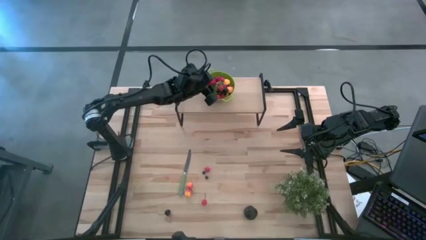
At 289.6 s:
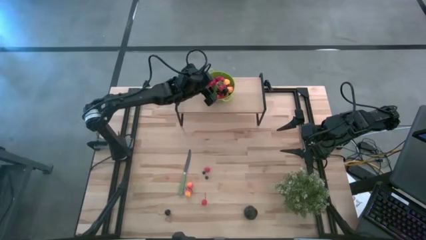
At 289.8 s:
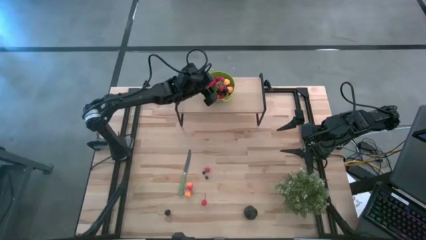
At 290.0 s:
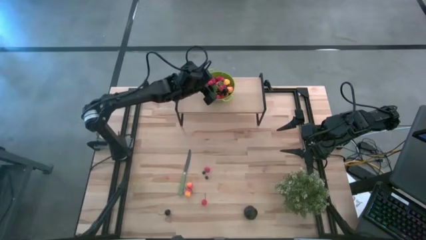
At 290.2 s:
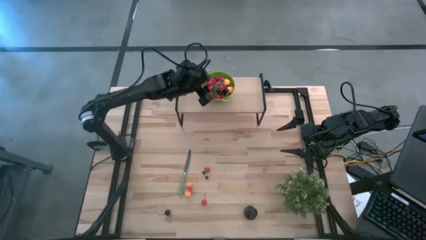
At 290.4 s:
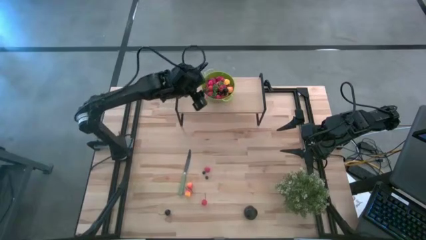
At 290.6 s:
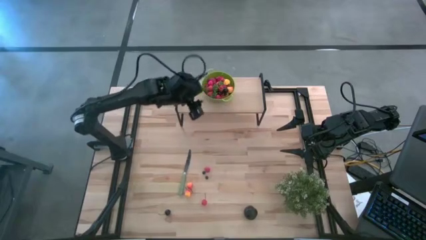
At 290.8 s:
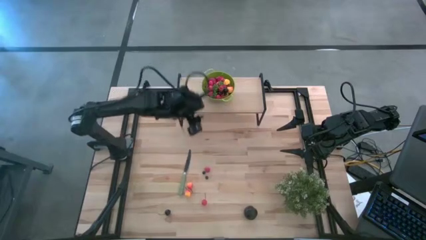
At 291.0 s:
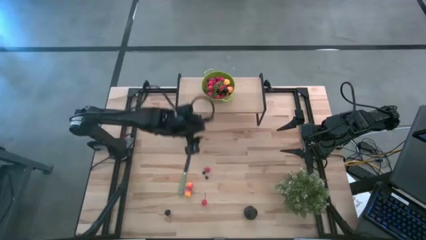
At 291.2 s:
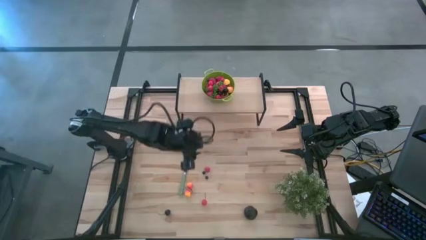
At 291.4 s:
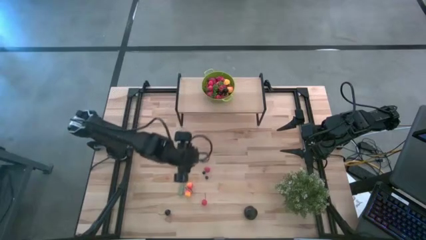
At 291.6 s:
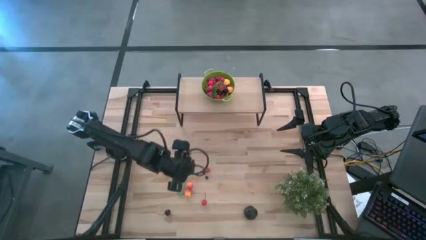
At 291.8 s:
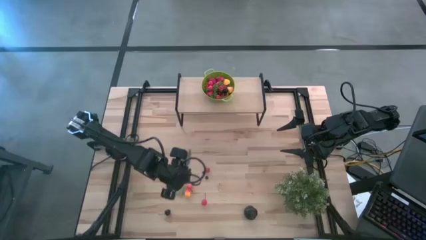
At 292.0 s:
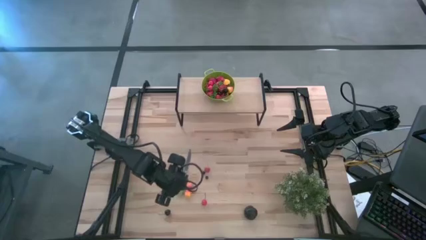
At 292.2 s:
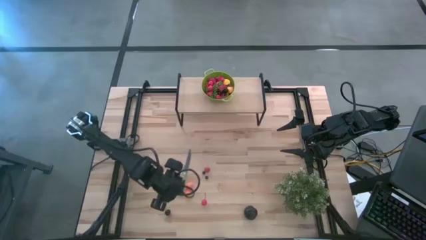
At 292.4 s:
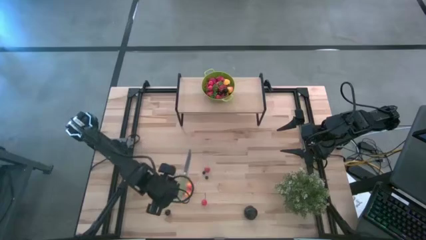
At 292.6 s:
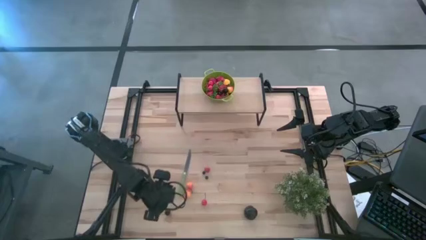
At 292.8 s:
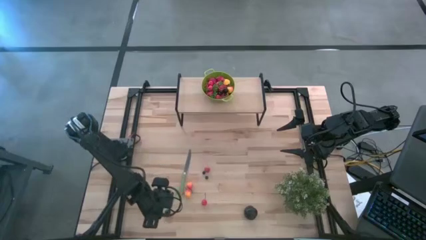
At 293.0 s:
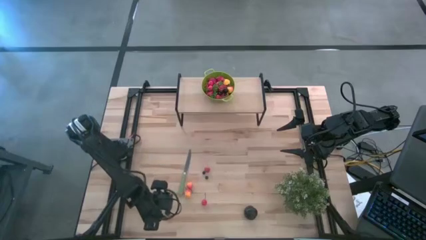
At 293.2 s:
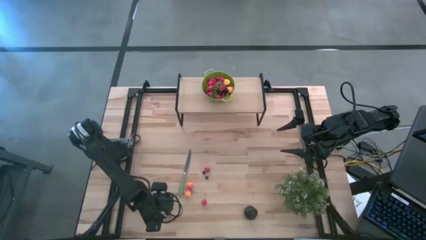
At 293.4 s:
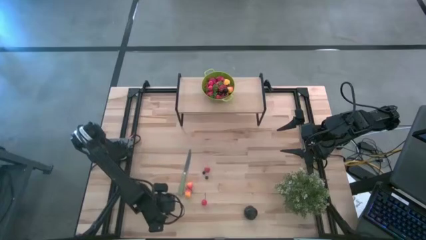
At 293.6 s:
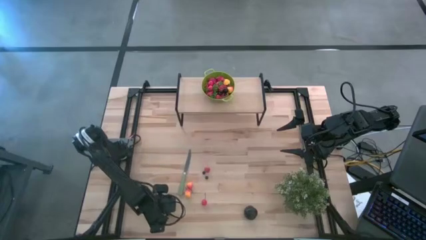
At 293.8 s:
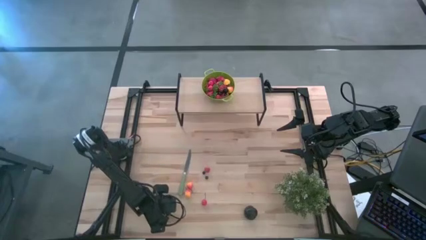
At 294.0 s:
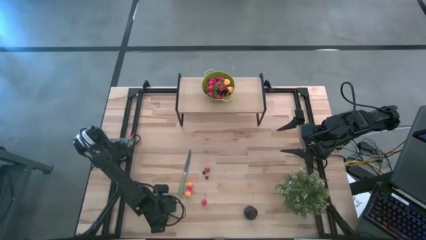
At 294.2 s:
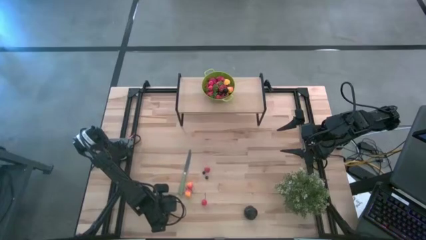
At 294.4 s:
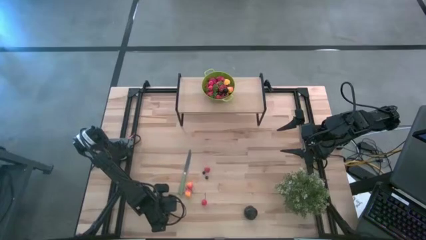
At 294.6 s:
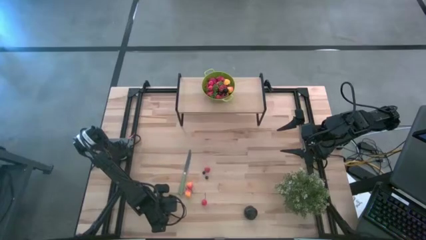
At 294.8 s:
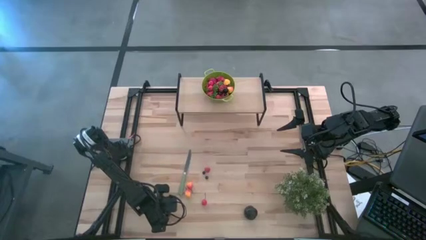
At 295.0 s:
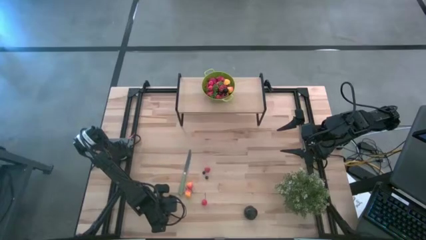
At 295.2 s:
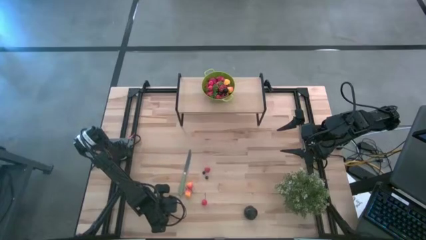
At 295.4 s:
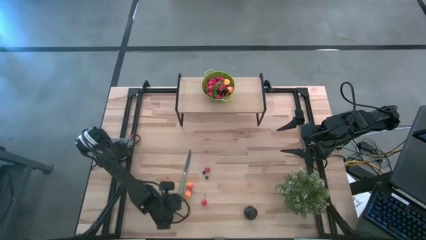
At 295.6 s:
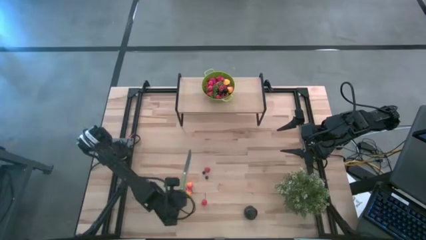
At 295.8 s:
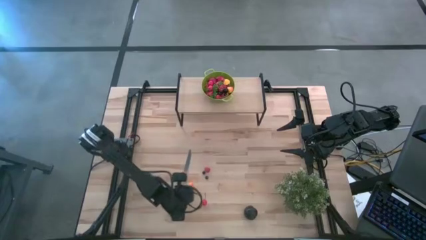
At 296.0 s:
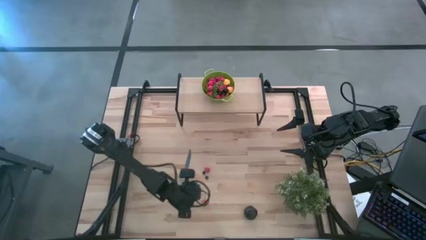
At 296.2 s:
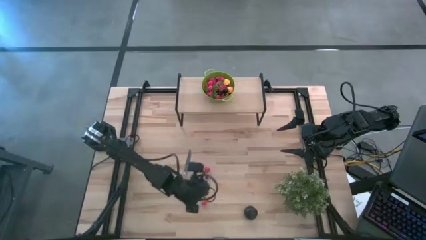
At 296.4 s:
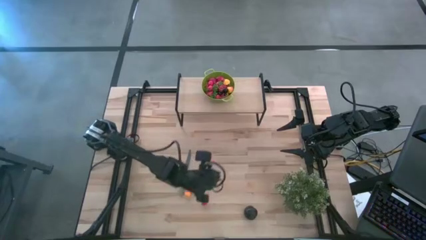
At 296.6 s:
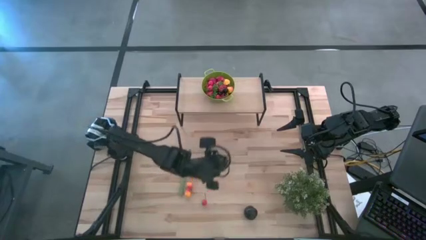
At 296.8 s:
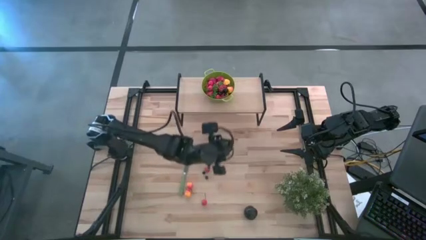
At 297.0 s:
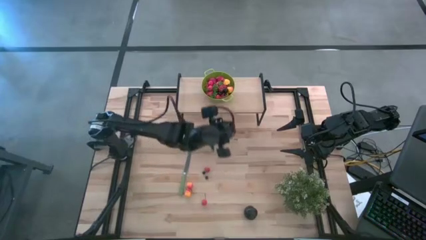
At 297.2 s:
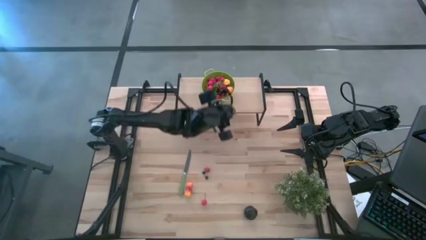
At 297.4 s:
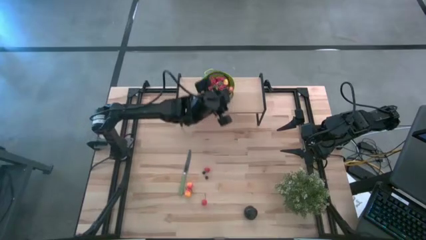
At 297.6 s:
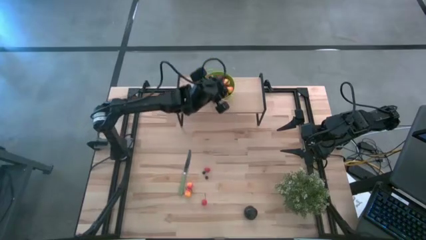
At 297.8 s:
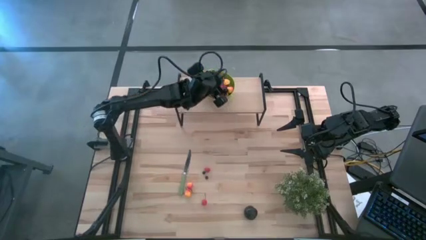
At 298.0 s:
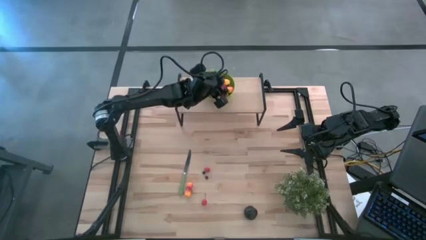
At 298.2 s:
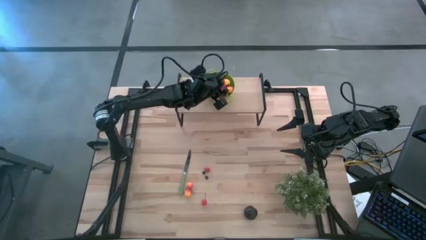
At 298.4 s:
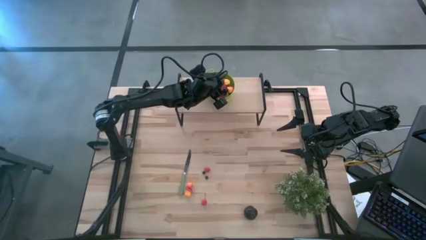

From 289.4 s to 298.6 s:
Task: Pick & Place Fruit
Put the black cherry into the green colander on the shelf

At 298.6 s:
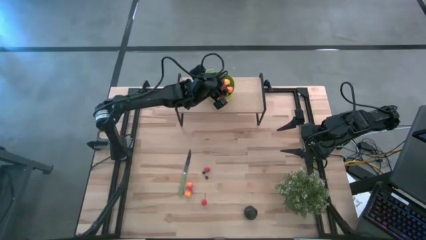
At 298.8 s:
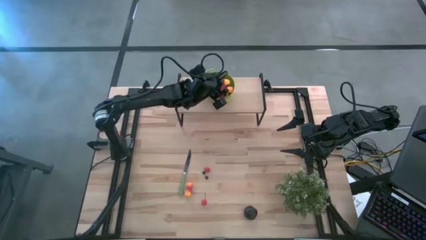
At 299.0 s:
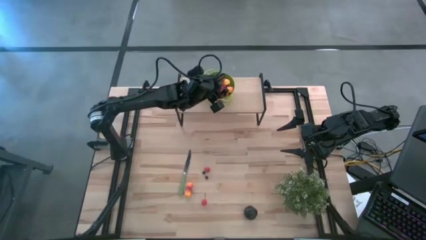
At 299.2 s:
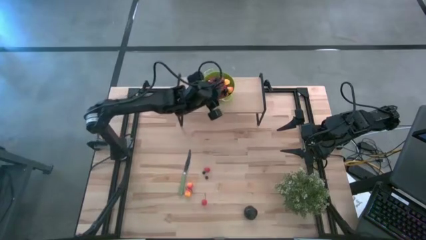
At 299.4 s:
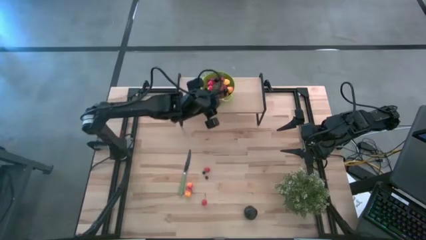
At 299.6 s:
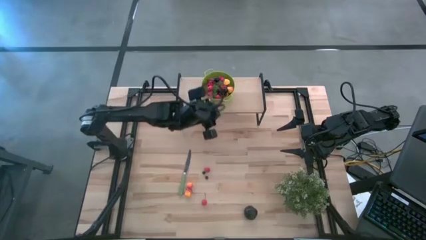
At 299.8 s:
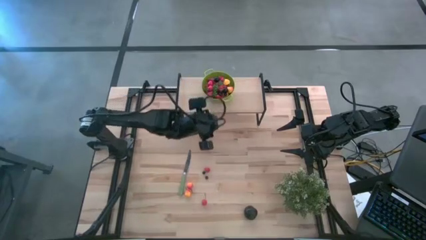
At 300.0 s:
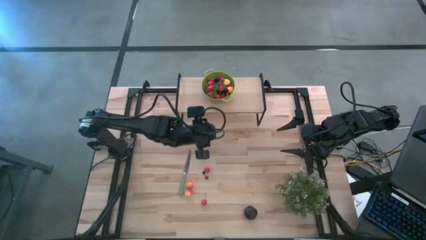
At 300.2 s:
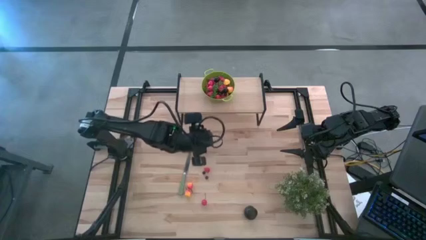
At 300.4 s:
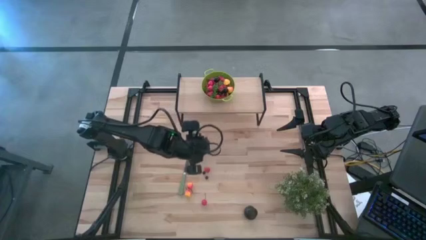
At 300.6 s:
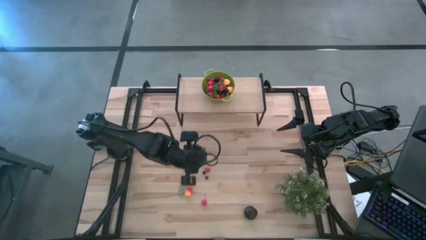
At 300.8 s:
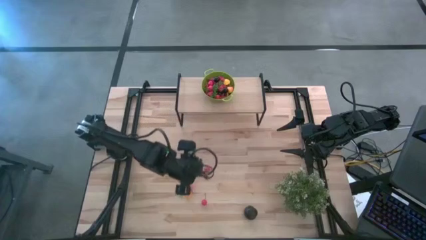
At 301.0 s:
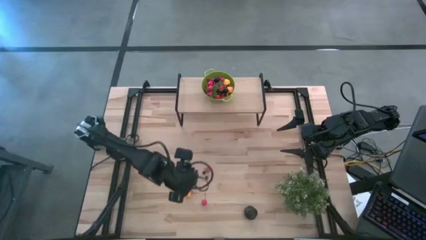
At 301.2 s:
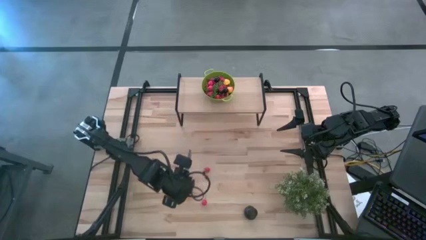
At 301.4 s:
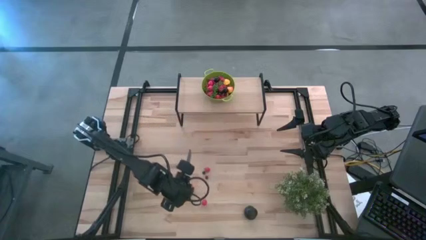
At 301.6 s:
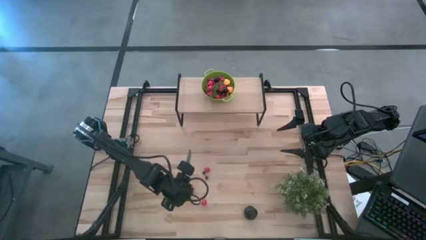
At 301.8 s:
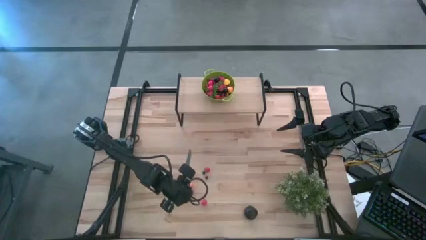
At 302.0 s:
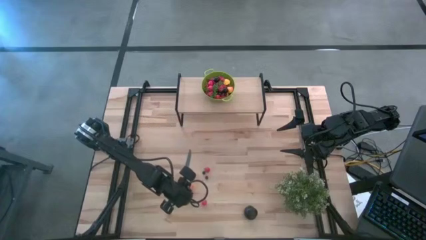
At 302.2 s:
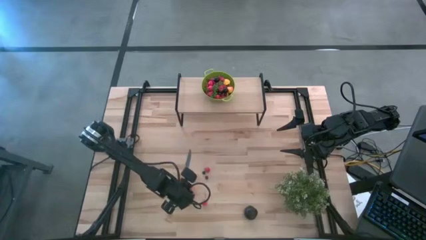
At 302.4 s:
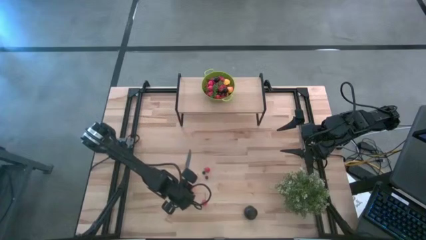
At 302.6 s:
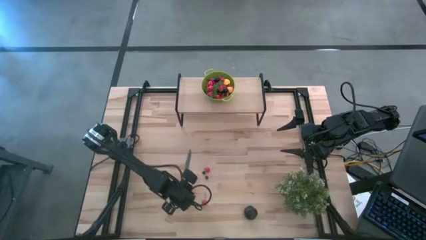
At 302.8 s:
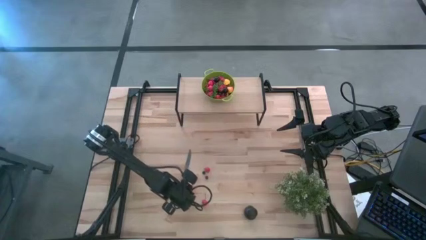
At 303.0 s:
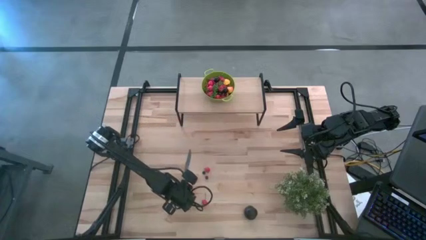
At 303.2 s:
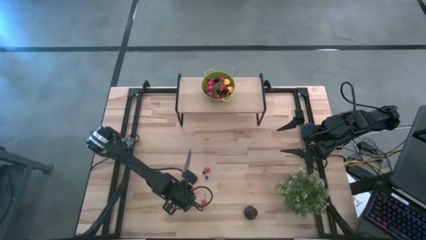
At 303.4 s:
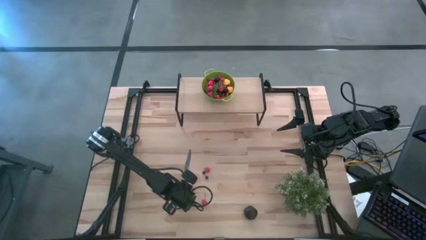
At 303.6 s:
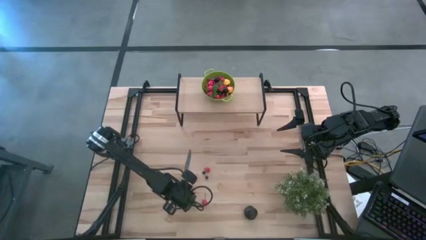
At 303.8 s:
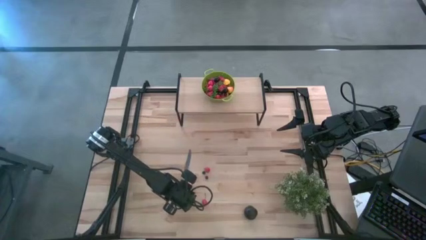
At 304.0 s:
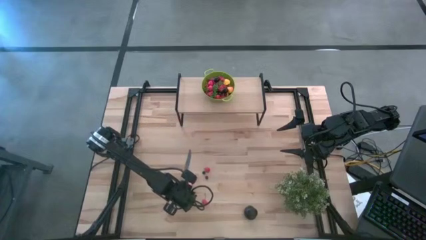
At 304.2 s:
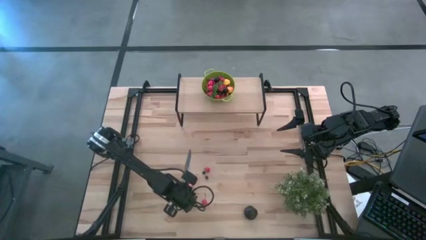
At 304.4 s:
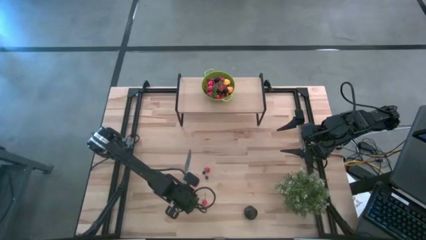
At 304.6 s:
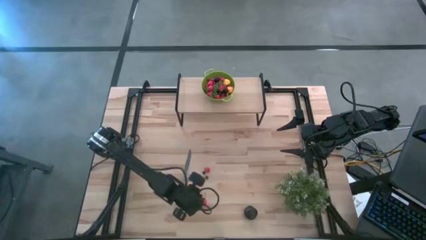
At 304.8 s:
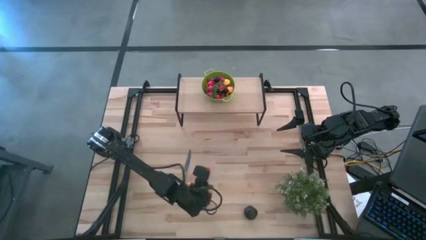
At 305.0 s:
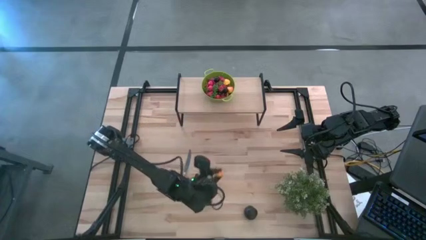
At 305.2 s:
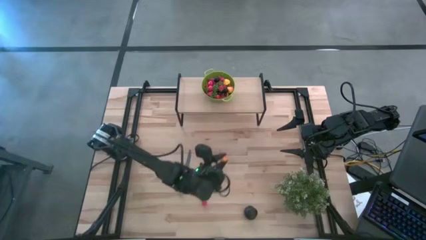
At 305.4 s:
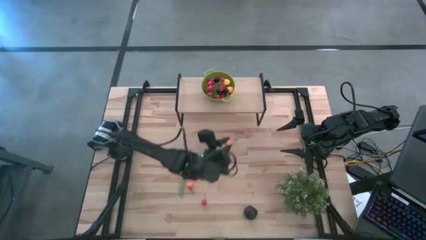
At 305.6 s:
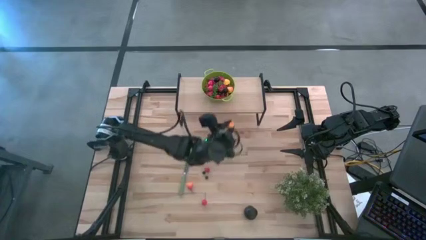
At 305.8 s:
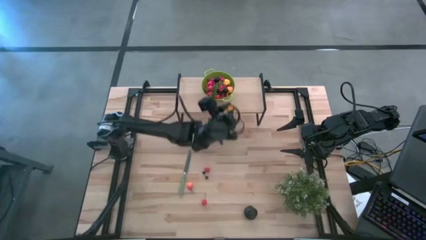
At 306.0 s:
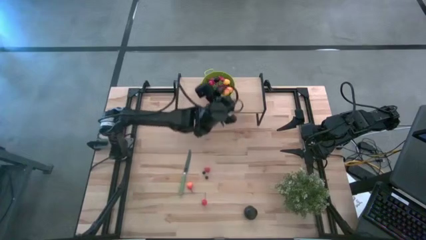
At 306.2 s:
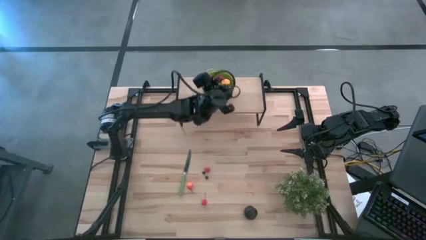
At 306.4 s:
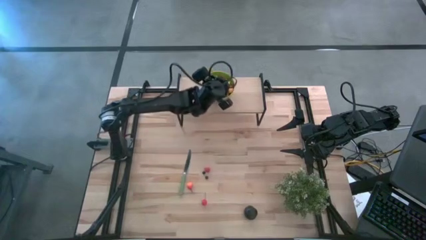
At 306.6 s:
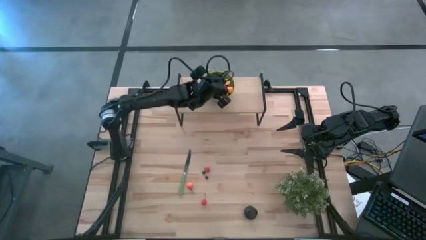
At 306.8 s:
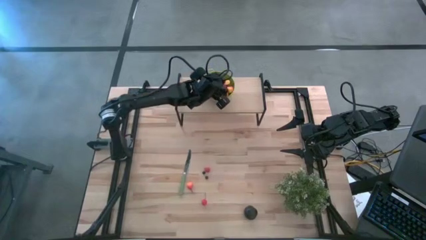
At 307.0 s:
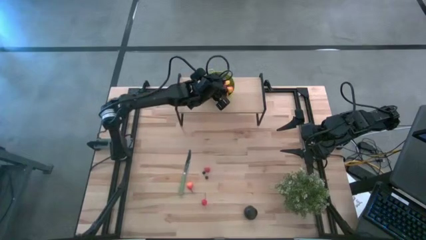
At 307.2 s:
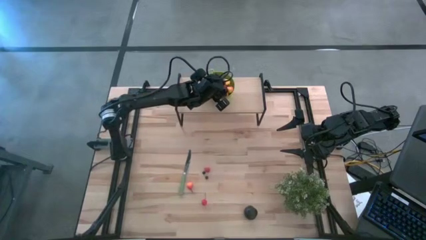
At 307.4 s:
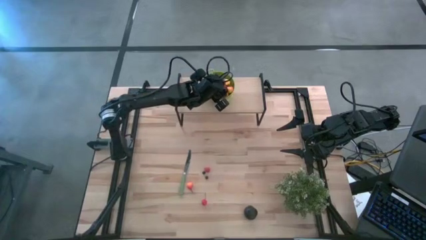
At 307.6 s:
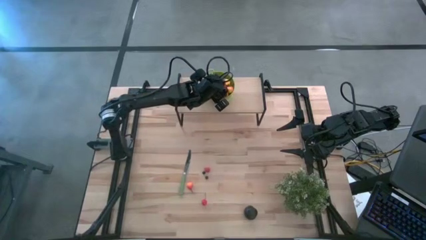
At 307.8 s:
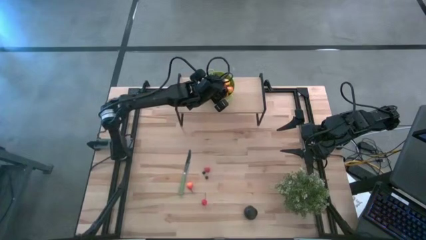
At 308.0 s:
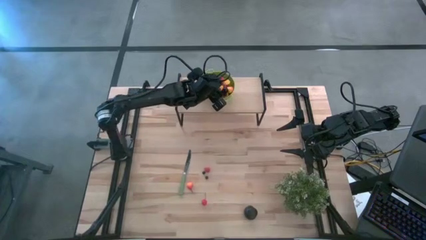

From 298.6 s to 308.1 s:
Put the pear into the green colander on the shelf
